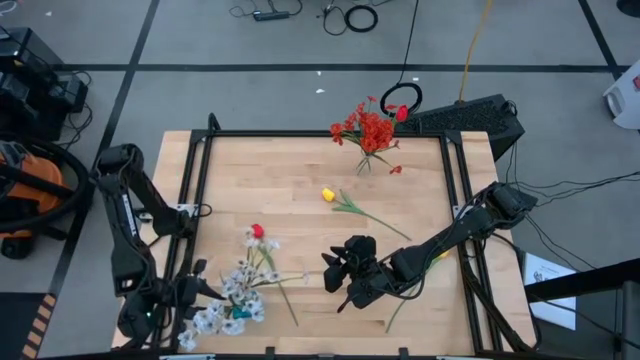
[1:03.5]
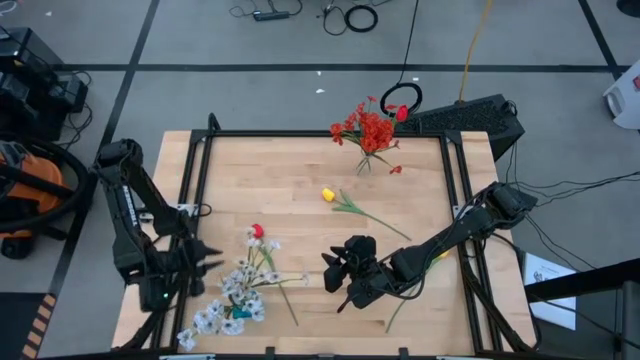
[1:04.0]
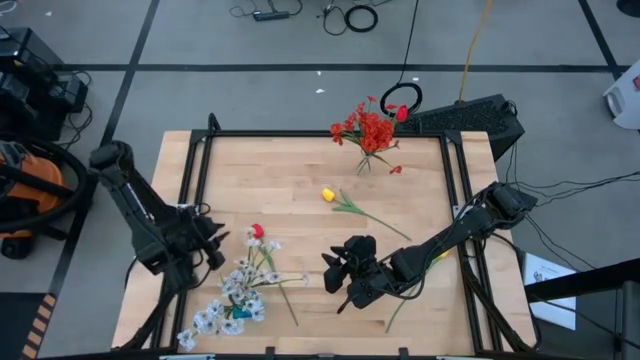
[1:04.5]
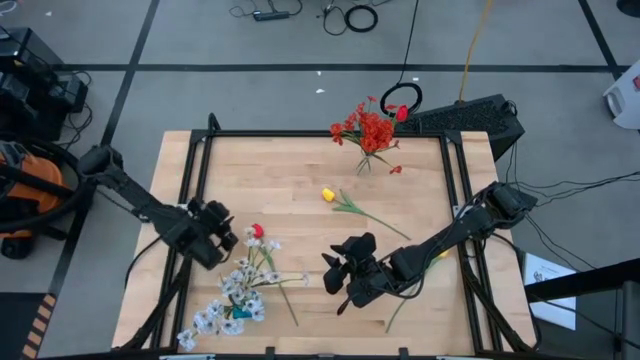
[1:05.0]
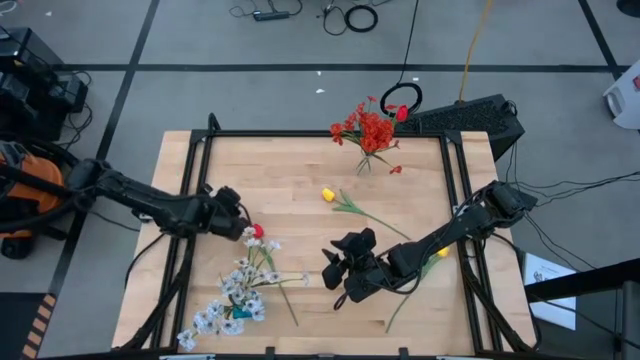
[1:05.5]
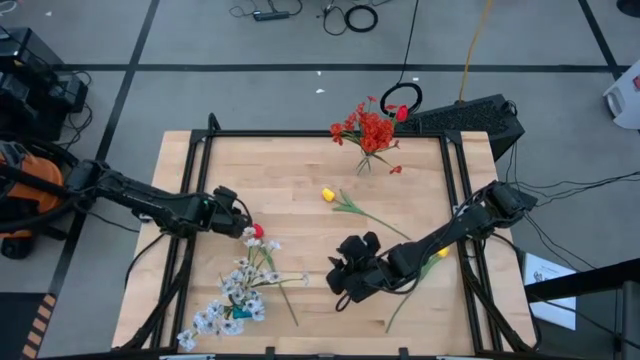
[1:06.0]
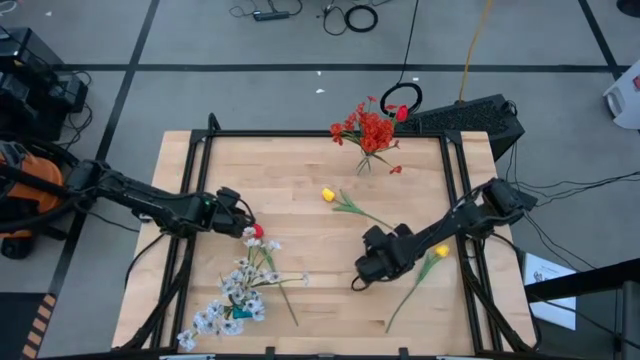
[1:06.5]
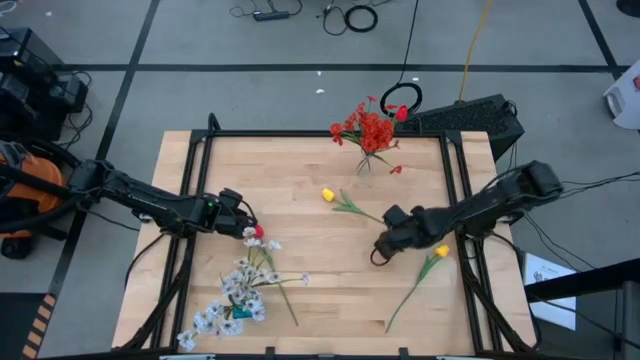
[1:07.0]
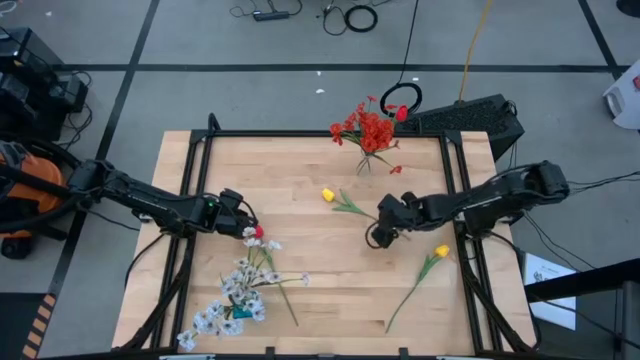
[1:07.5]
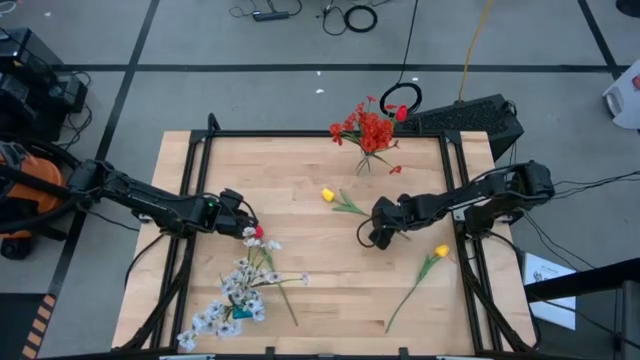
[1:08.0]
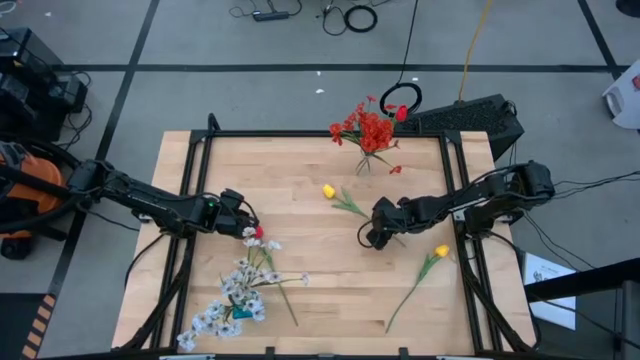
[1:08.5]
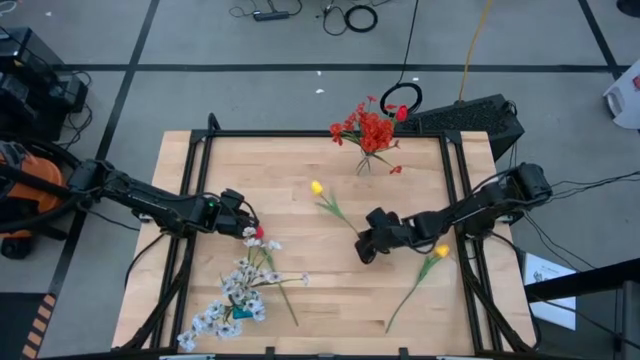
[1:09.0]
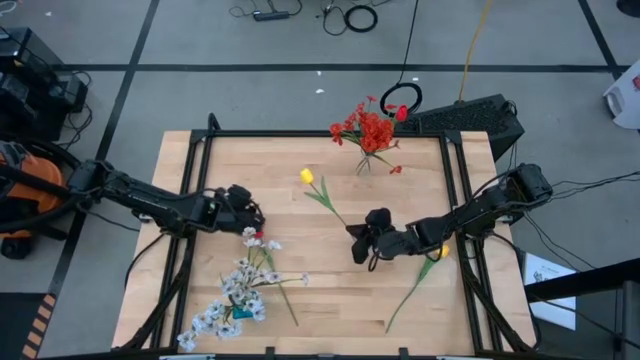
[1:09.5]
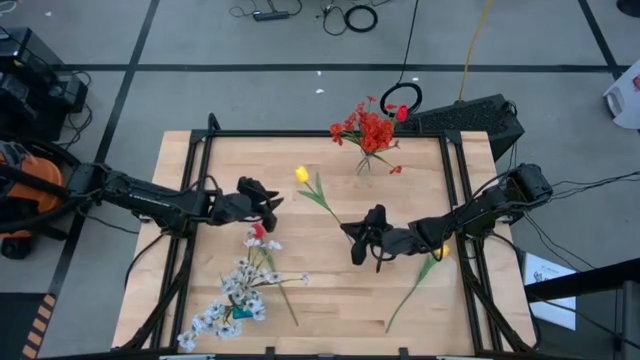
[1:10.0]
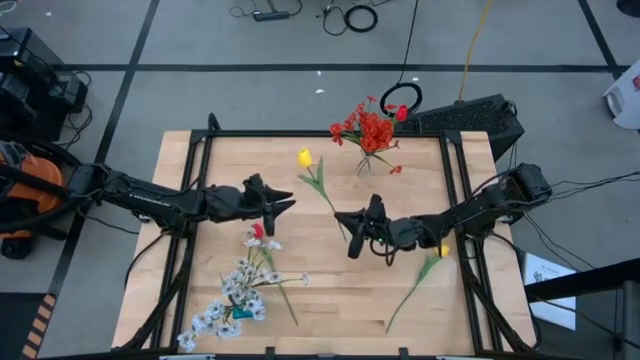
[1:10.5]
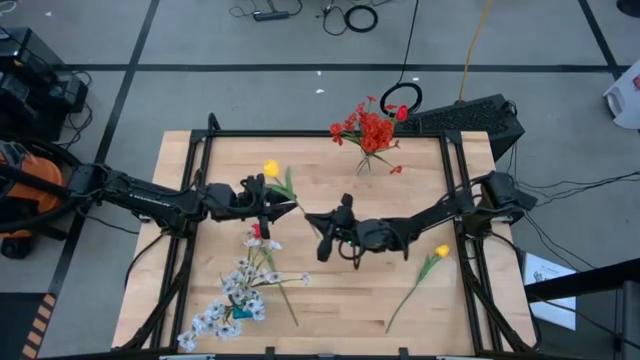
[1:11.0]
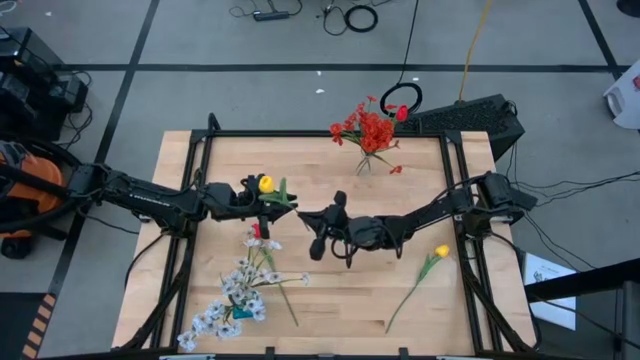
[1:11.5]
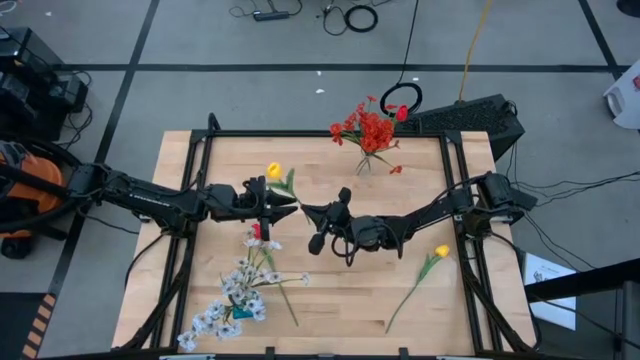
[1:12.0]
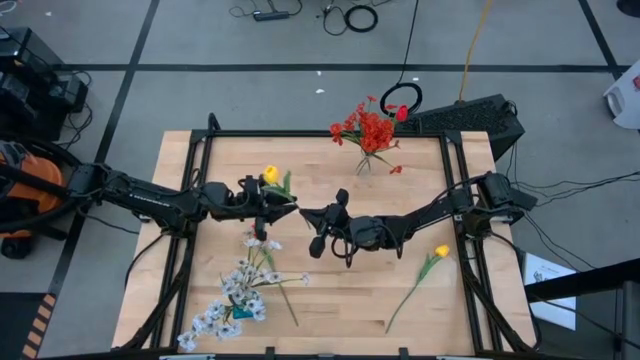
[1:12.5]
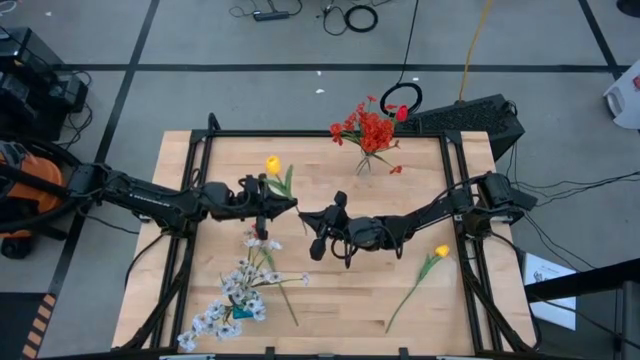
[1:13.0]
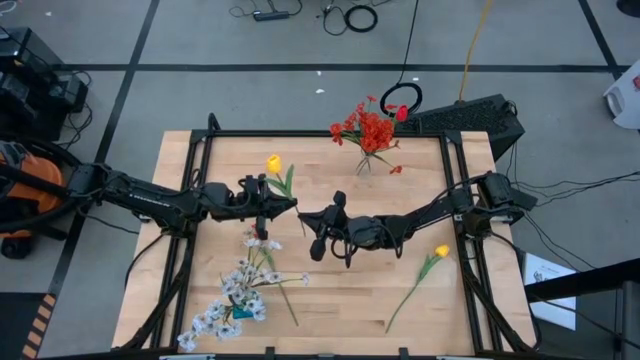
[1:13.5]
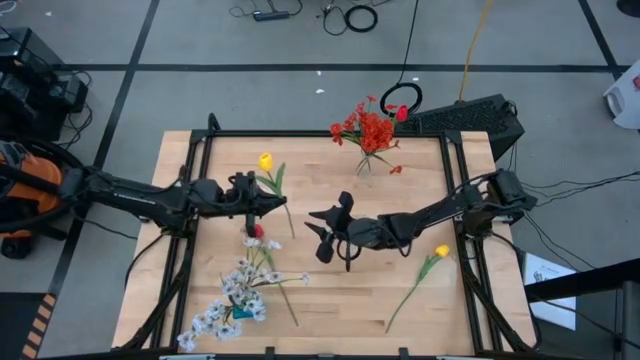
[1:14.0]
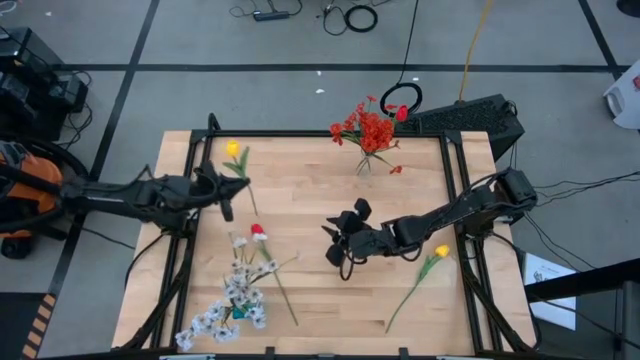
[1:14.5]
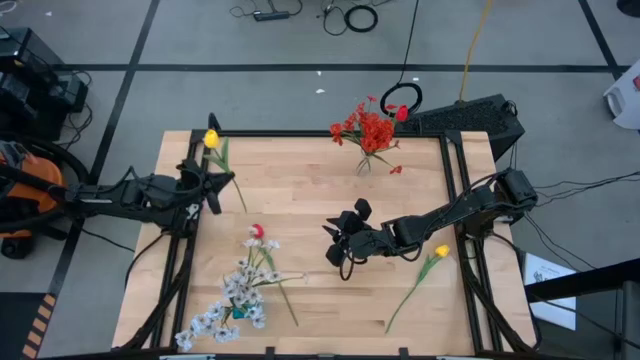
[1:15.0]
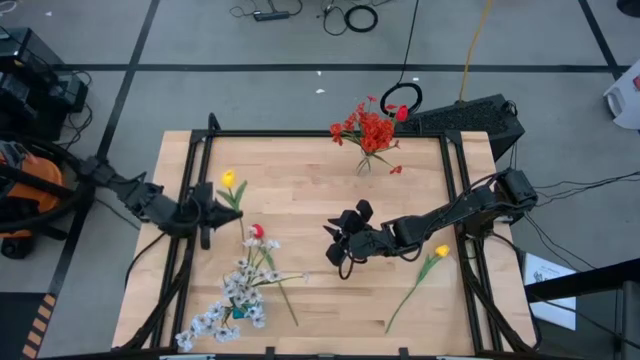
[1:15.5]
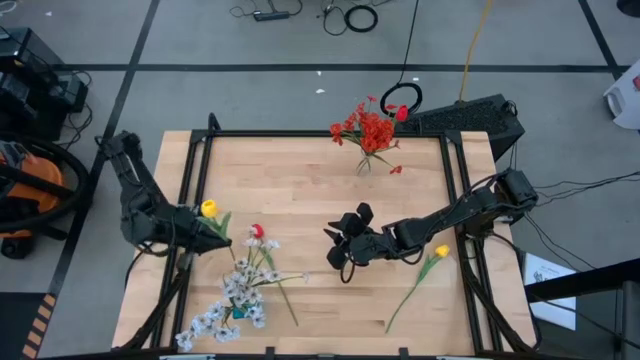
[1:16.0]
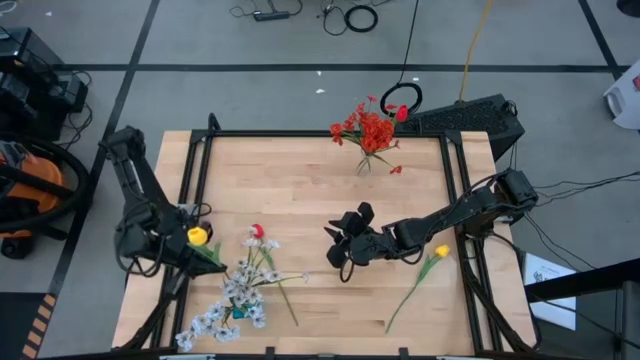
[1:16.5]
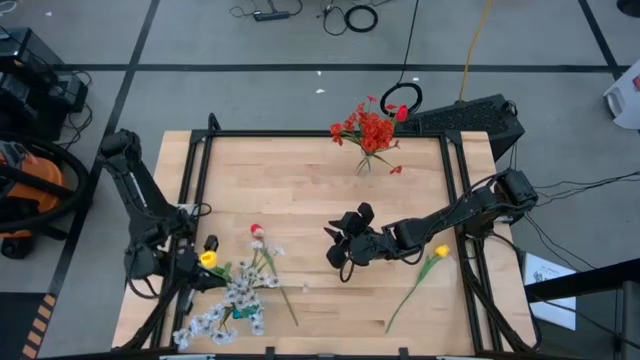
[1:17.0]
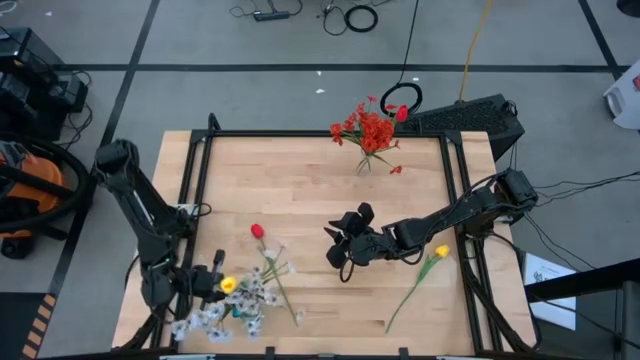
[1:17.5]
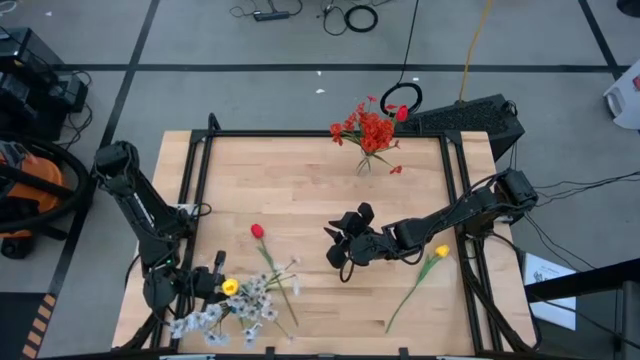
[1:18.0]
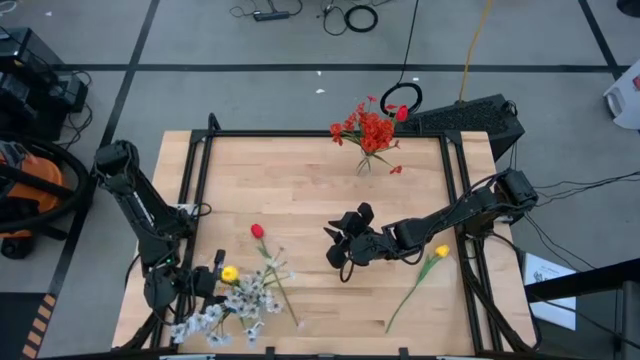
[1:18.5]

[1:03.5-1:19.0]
Task: Sort flowers into vase by color
Put the top yellow flower into the blue flower vase
